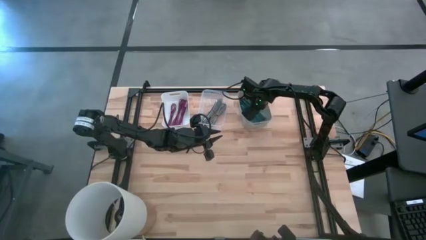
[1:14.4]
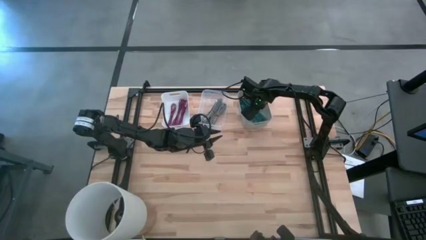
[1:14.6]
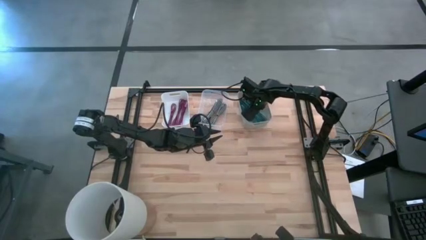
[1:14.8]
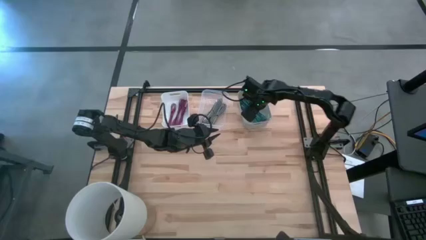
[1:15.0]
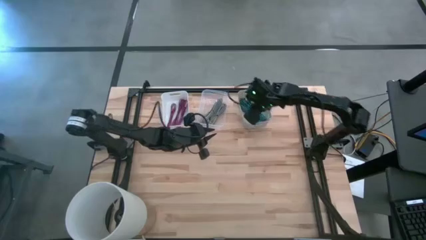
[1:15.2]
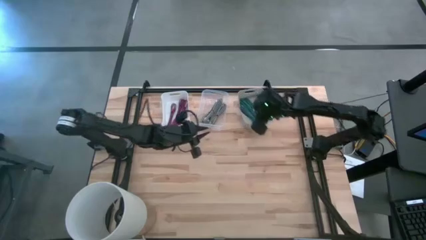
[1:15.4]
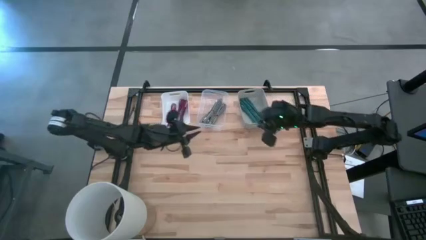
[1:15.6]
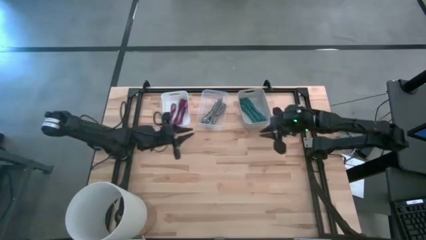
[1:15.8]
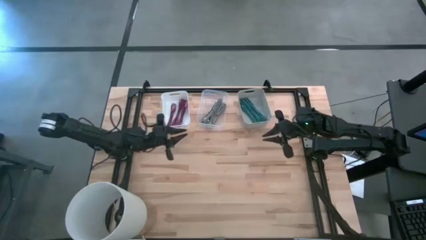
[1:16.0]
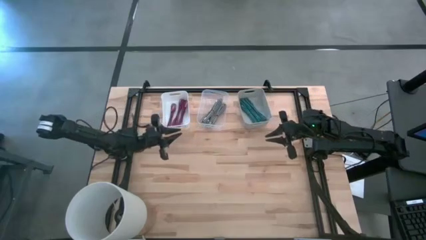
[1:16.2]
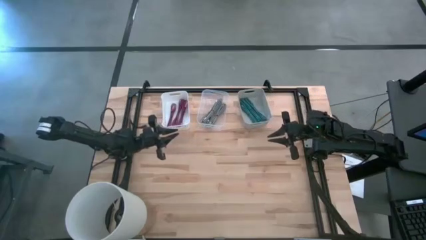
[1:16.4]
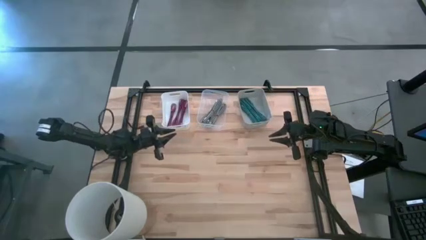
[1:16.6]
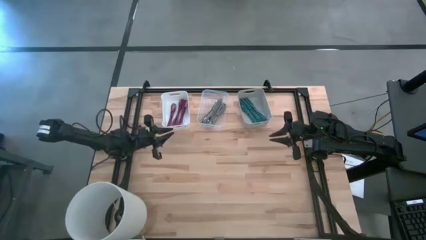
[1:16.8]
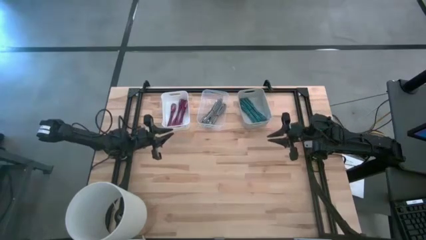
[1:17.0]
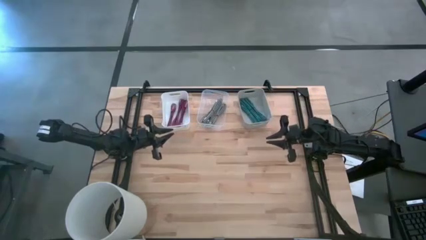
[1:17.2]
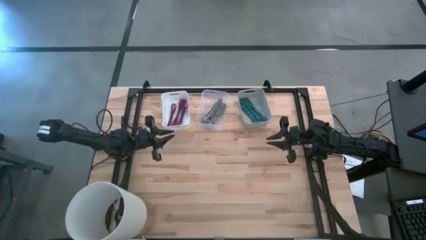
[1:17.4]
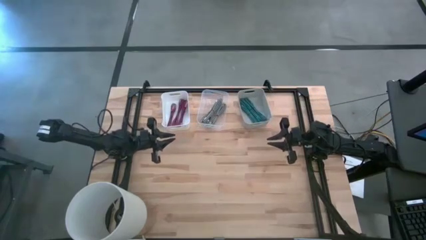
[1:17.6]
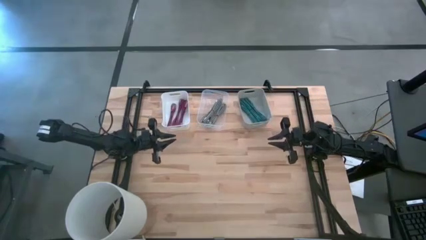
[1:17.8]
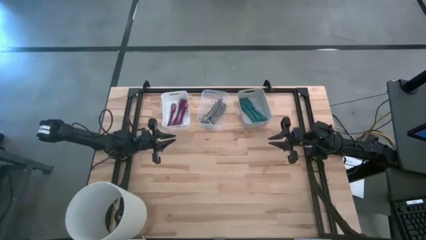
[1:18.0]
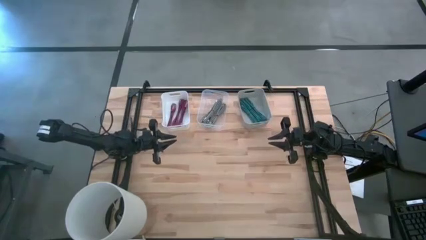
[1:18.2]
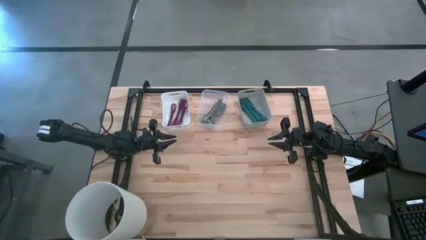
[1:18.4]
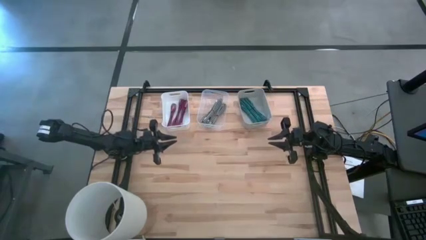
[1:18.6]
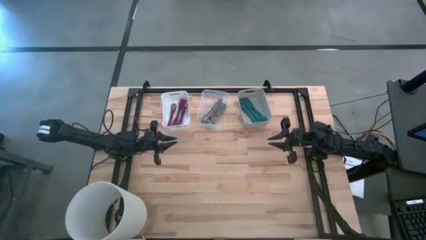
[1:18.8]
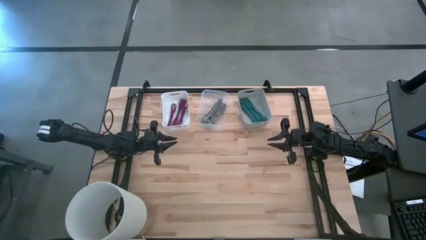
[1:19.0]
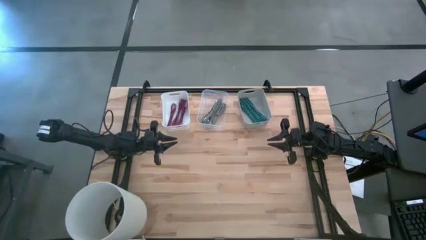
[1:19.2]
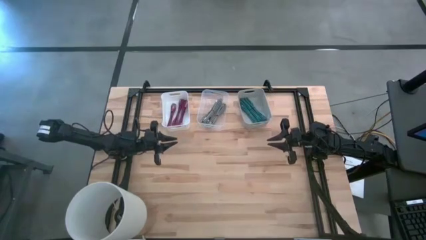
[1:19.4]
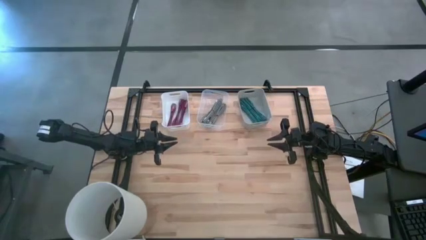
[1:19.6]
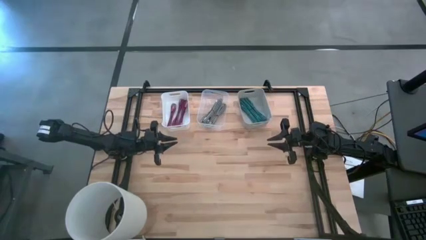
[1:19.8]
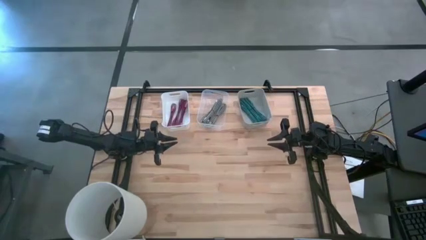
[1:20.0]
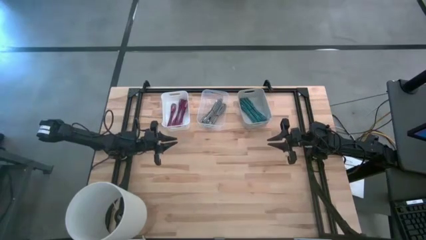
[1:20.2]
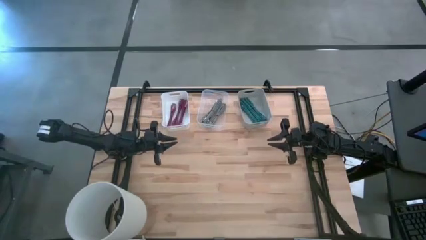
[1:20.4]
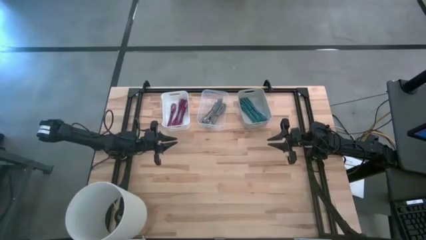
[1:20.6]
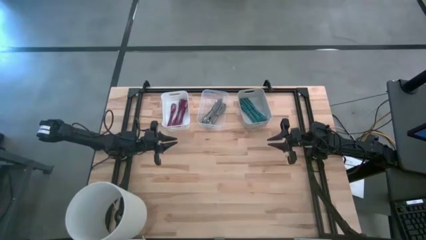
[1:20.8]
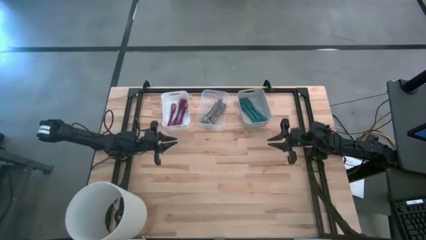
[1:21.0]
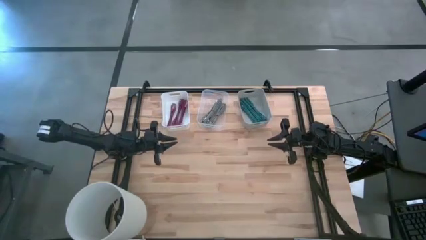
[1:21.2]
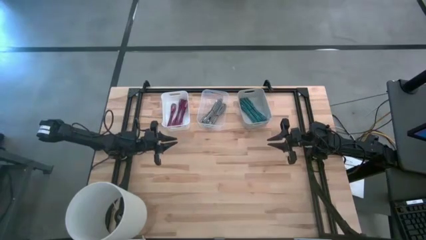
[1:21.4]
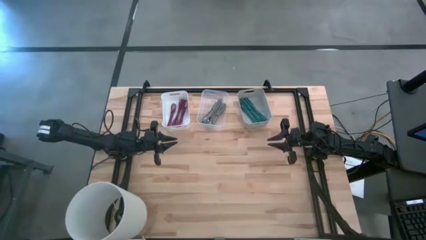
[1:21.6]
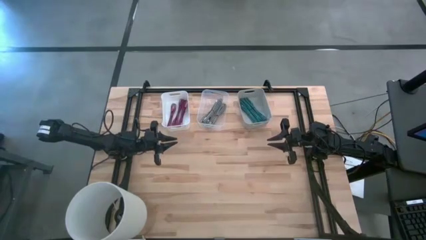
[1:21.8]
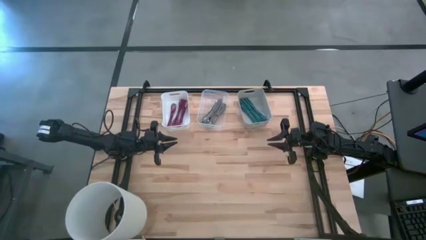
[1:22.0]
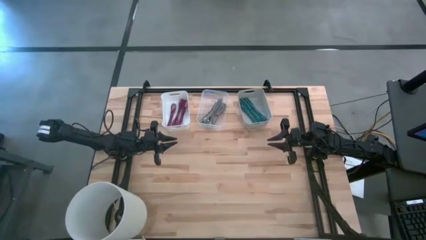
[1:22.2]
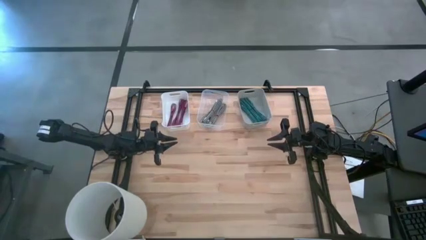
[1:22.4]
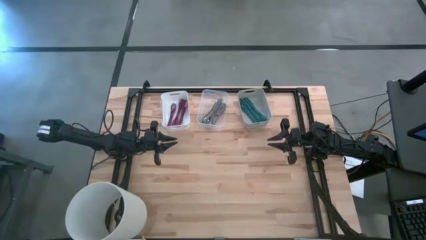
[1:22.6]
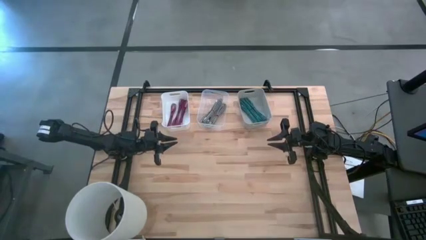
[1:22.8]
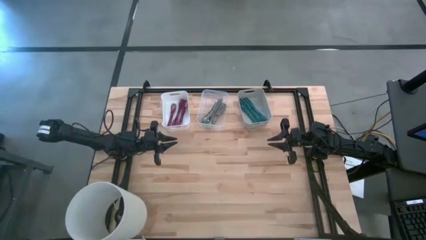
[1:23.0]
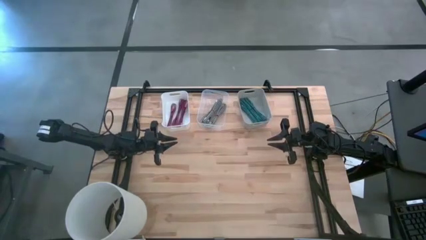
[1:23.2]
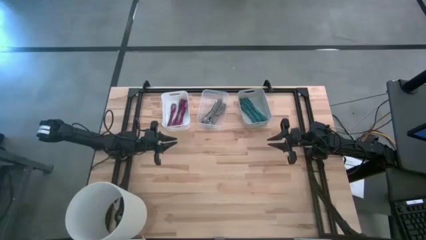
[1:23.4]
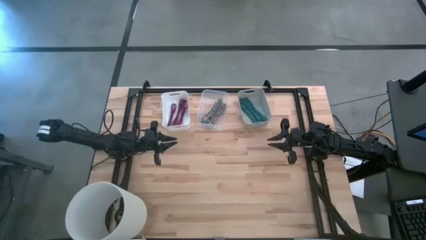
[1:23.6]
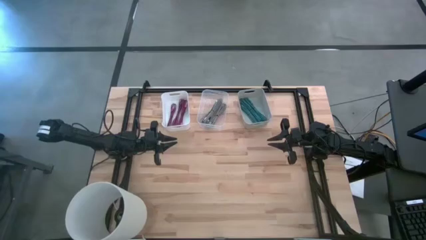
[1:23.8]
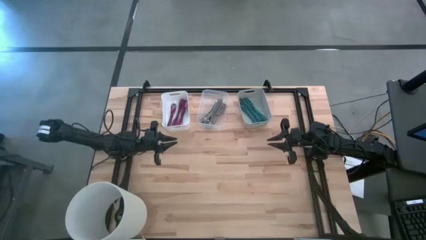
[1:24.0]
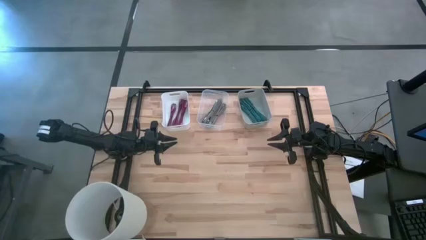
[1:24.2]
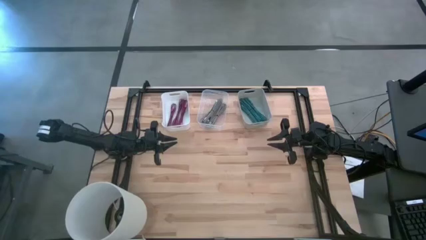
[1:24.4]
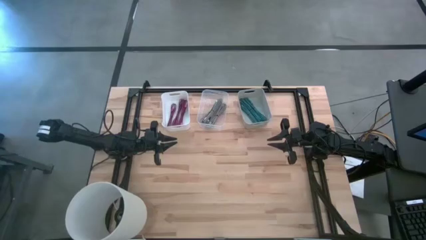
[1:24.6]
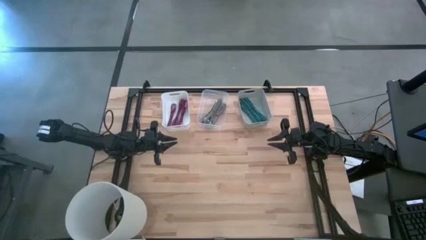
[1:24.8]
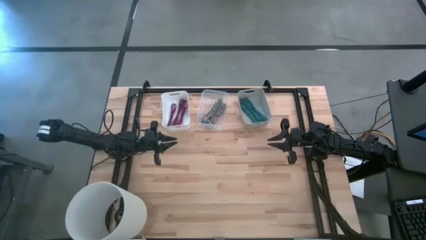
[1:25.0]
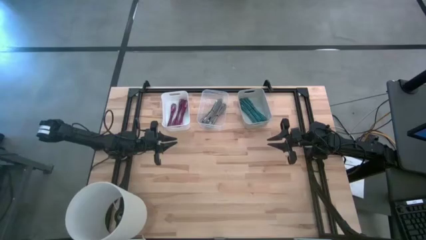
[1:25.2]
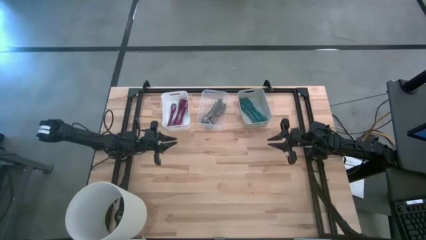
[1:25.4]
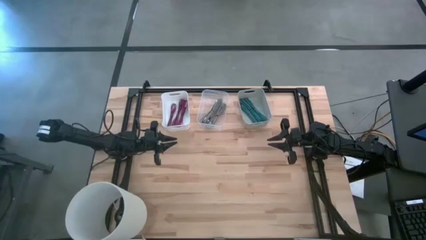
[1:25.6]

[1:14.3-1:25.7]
Task: Pick & Place USB Port
Return to Home Position

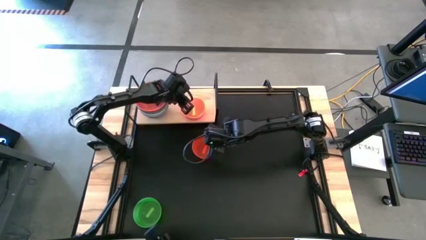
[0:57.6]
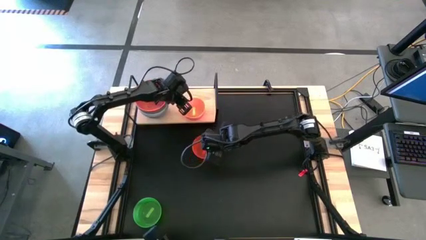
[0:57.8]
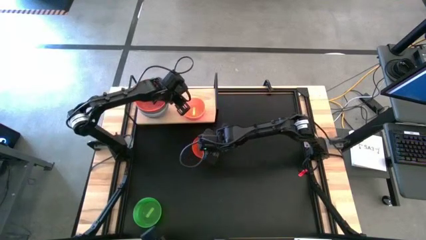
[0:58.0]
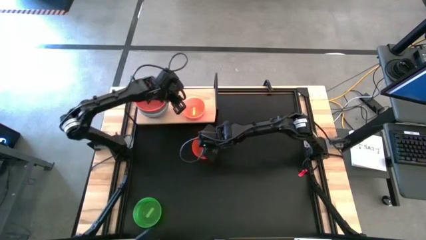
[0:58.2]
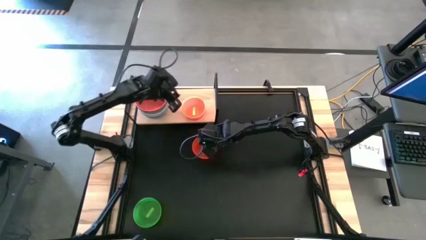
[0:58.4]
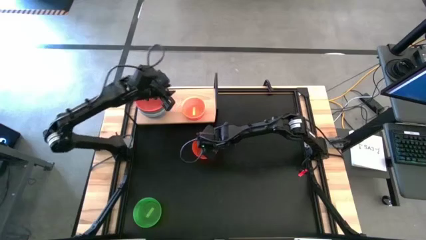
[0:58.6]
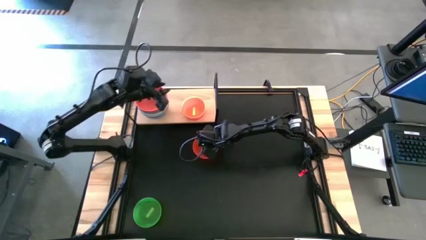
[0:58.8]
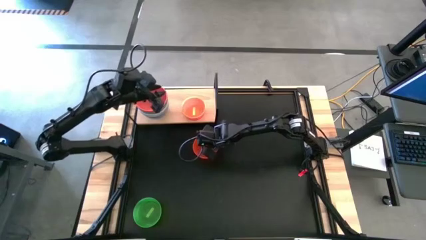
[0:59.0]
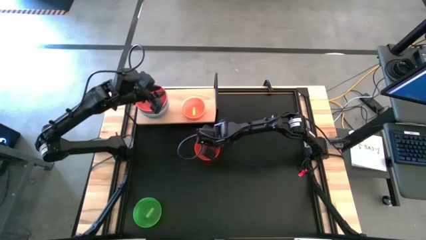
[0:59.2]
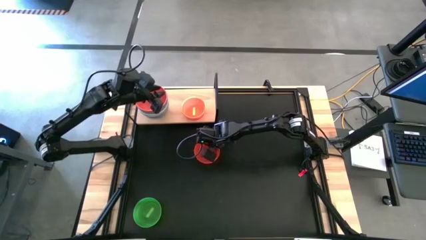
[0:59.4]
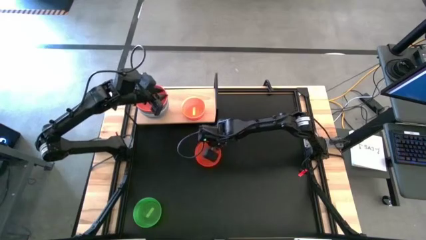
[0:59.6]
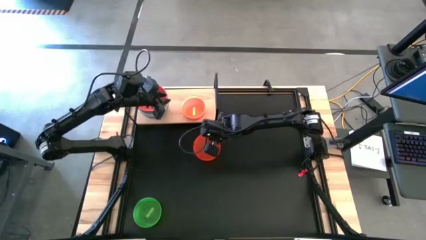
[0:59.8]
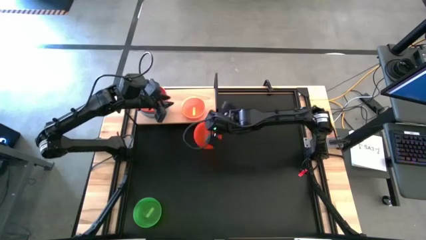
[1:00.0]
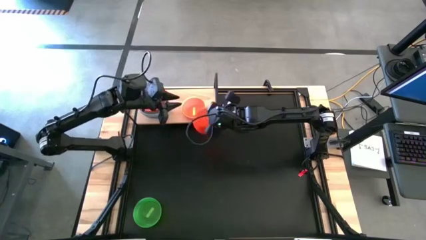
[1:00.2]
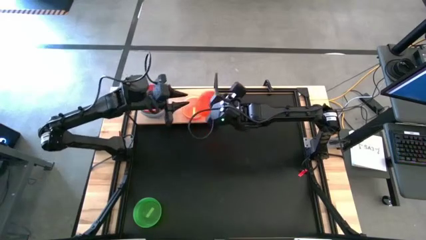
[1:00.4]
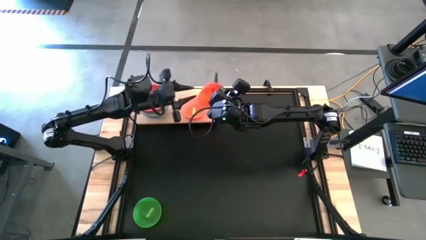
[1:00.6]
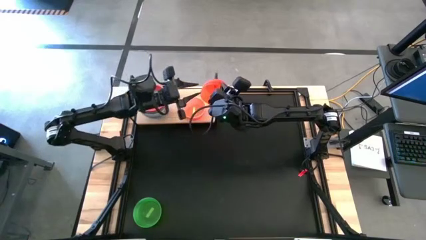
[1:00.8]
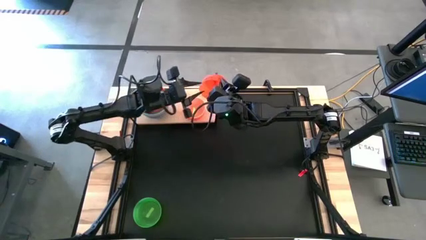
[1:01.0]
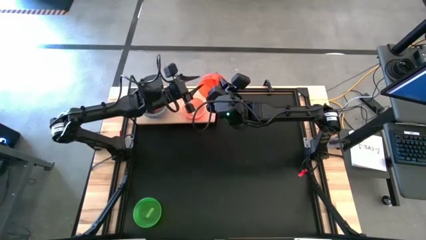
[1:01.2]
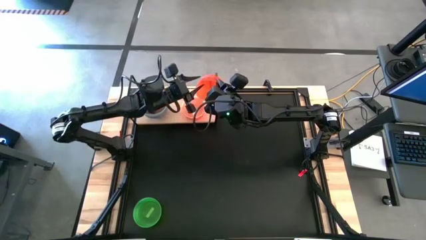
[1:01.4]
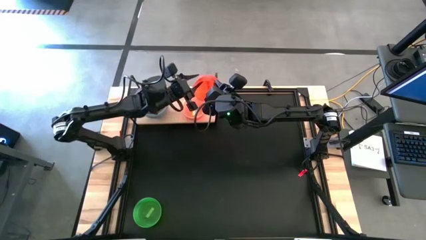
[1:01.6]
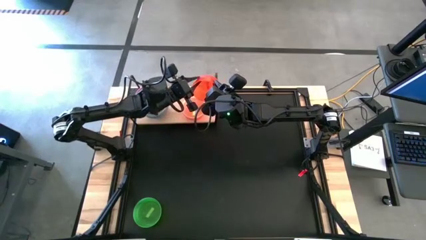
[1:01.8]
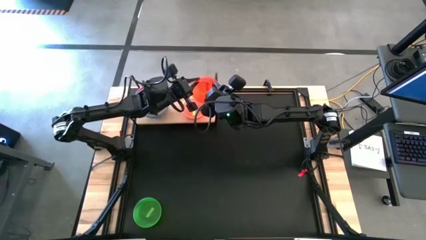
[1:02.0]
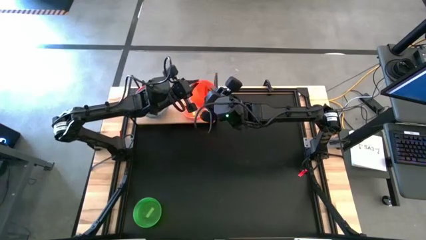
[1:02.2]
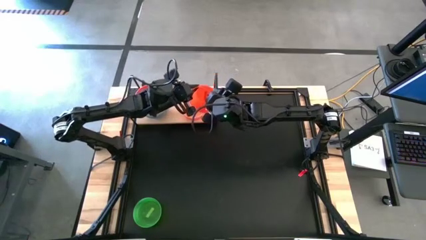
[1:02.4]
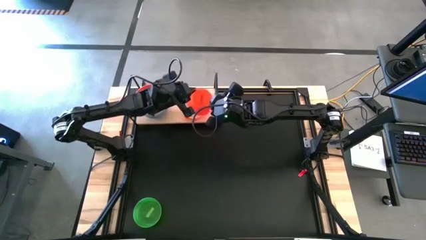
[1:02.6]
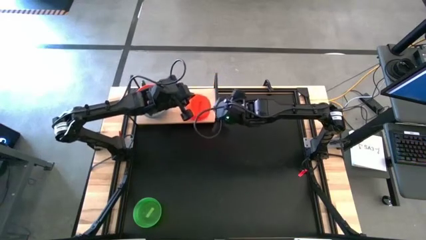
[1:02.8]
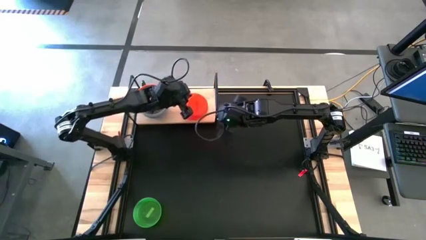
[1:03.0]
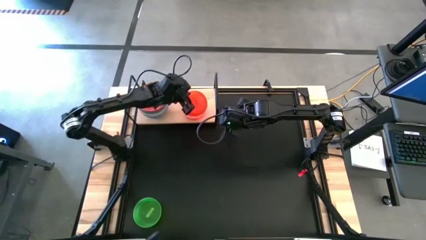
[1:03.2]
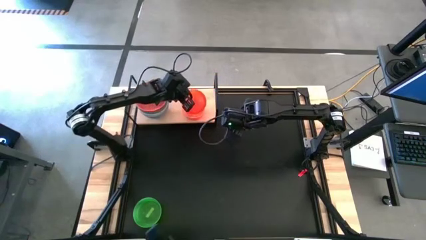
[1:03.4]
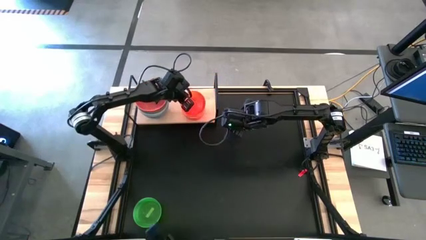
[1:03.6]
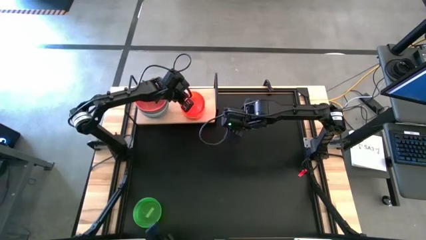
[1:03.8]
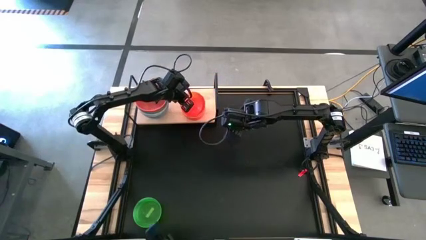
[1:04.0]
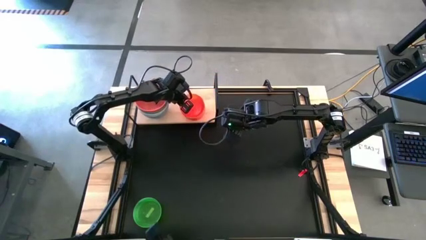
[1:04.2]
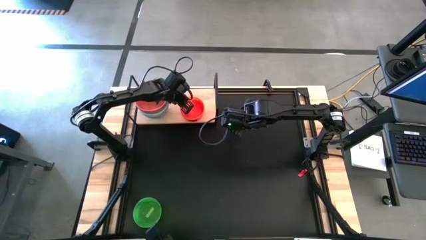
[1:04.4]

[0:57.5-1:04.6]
Task: Place and stack bowls onto a shelf
Stack the light orange bowl on top of the yellow bowl on the shelf
